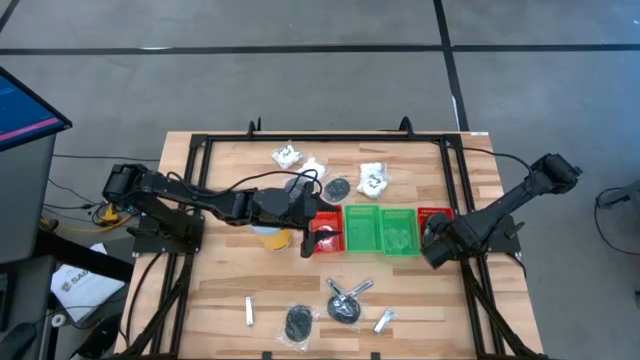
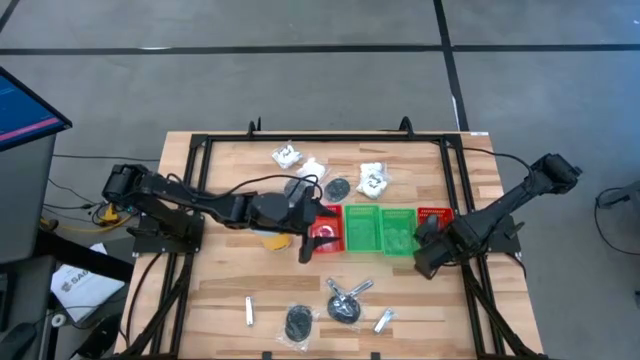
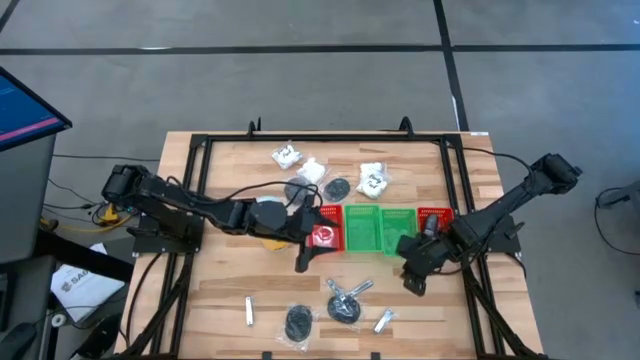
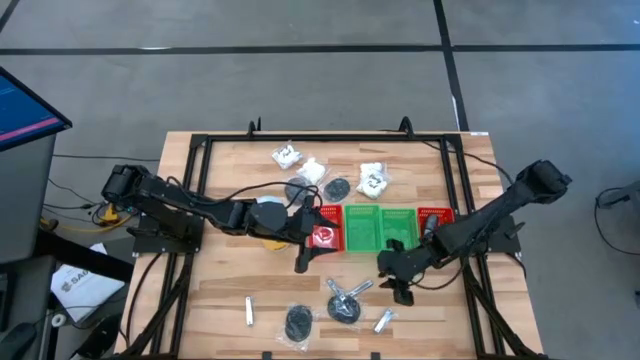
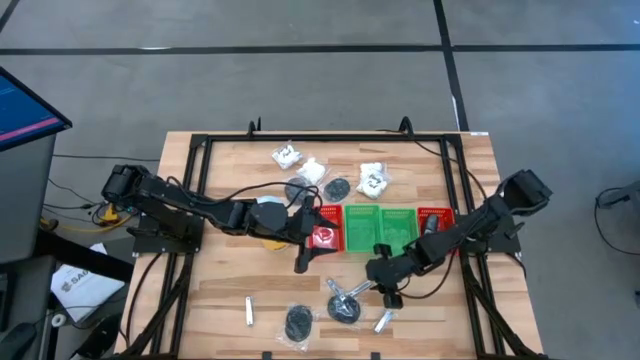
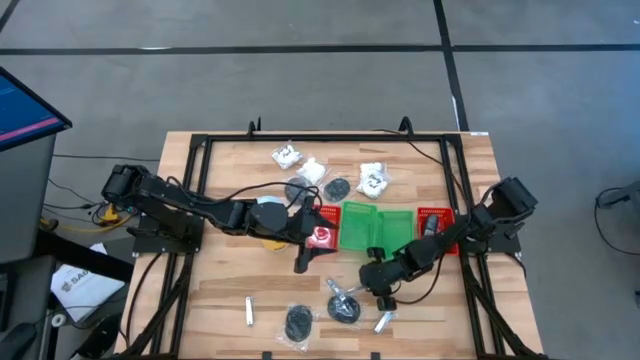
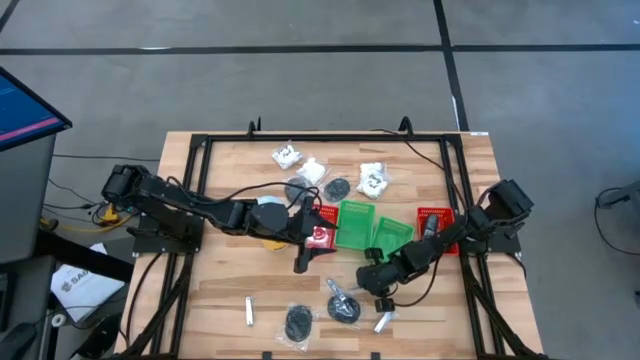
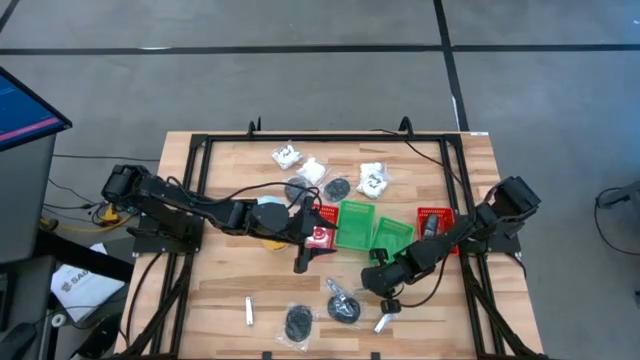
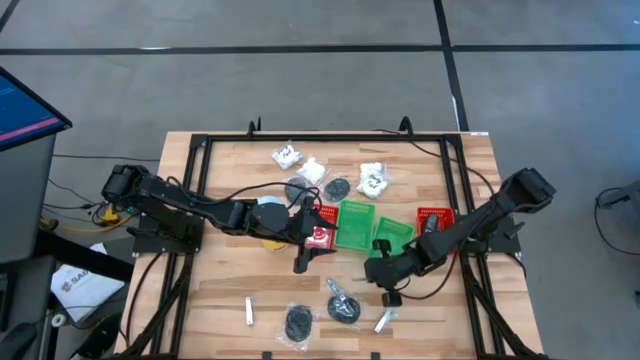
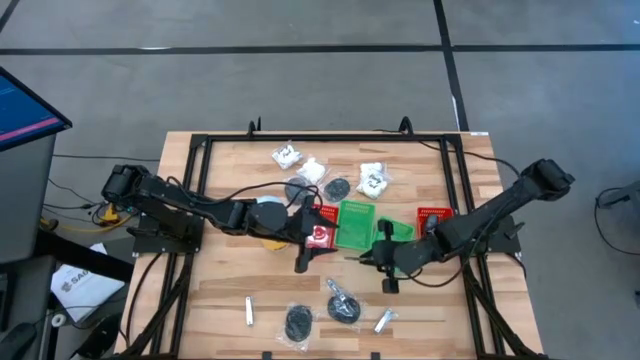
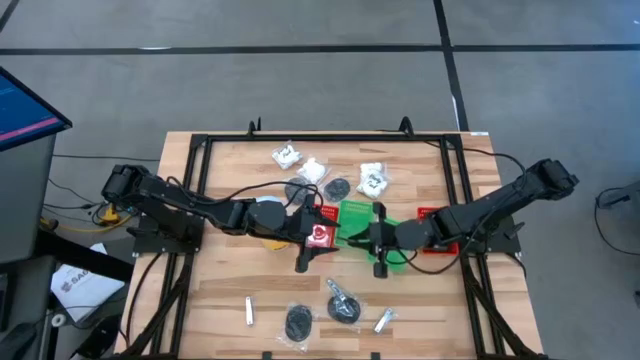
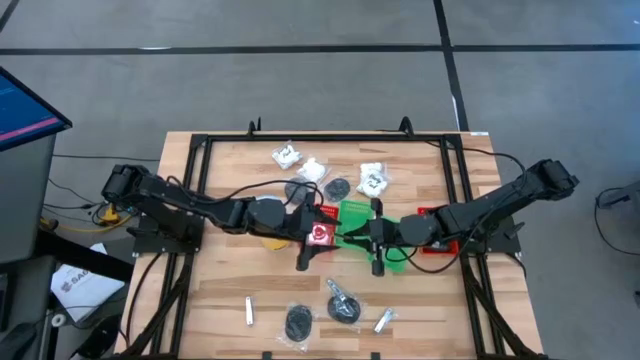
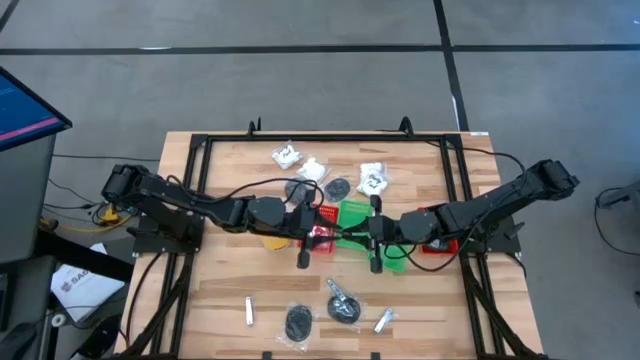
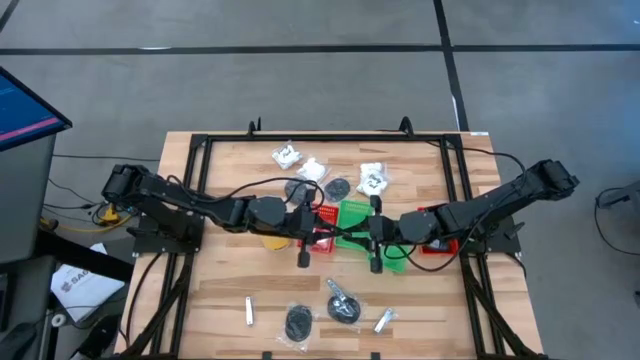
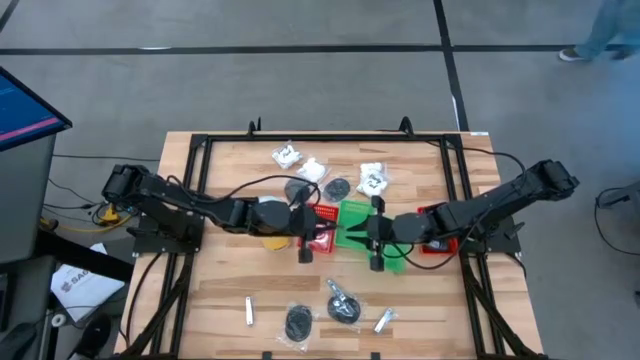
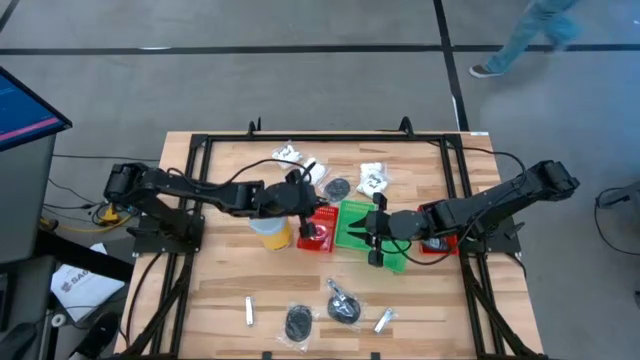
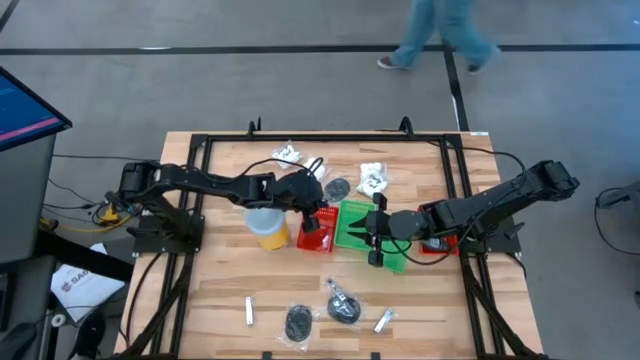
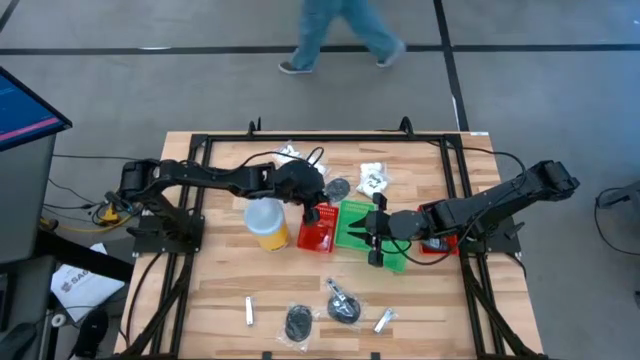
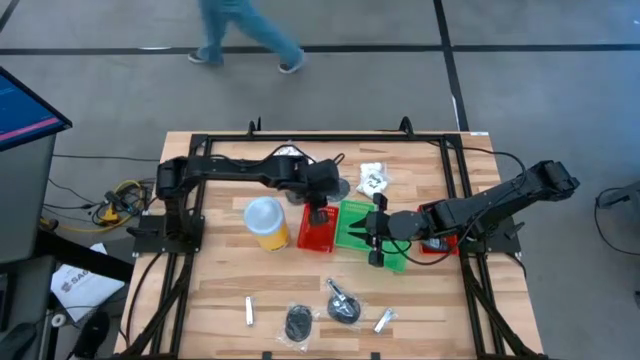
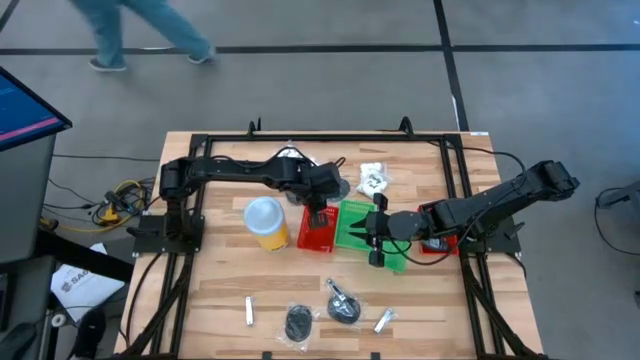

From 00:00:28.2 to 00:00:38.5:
Task: Pick & Place Travel size toiletries
Put the nail cutter into the left red bin

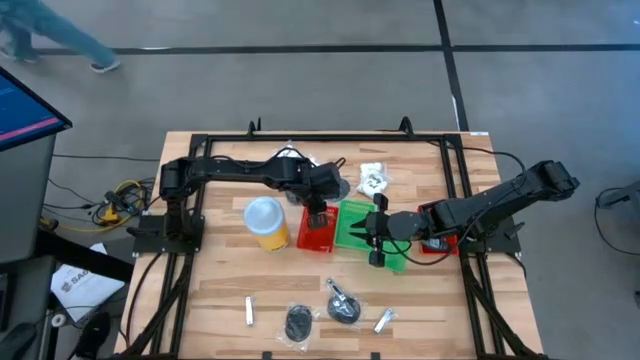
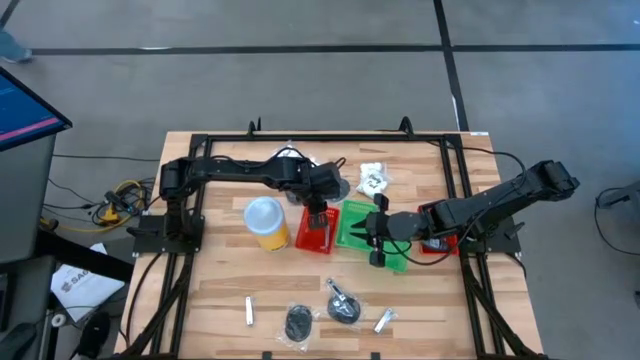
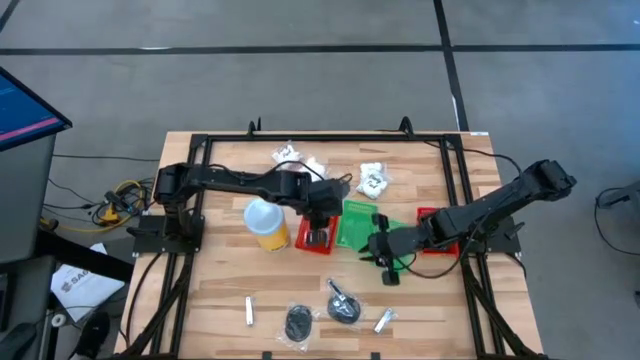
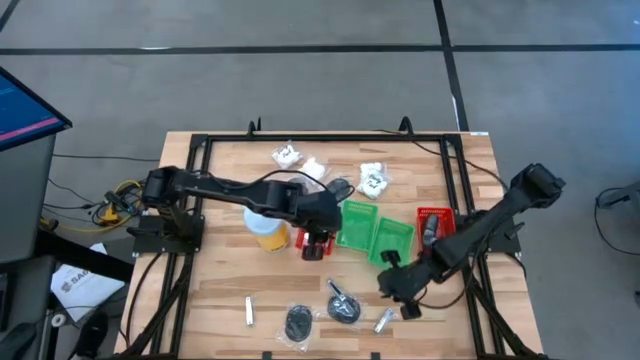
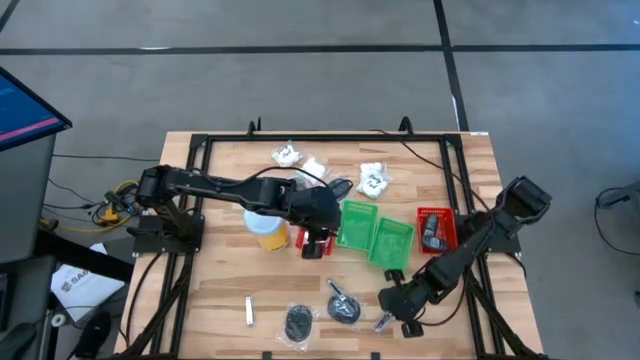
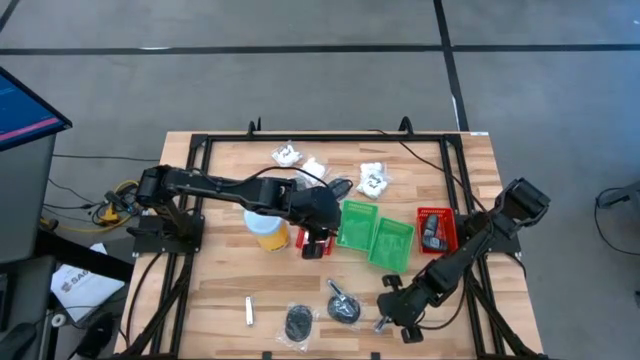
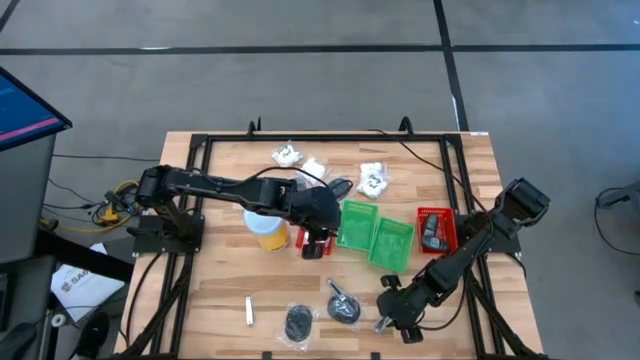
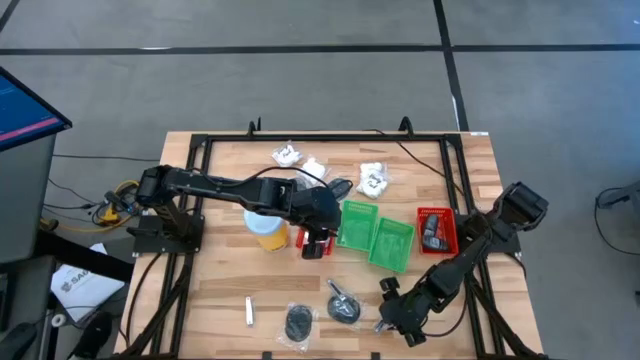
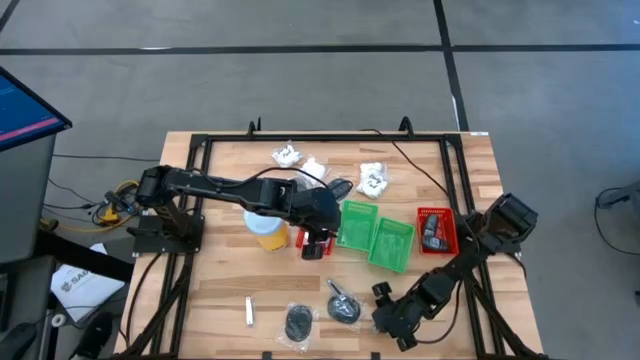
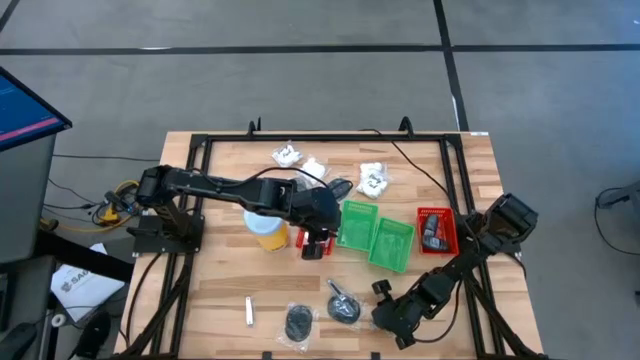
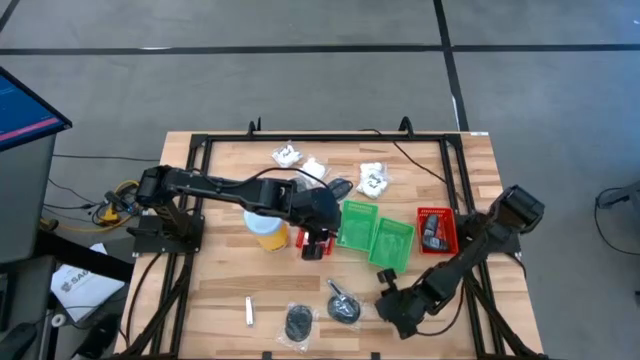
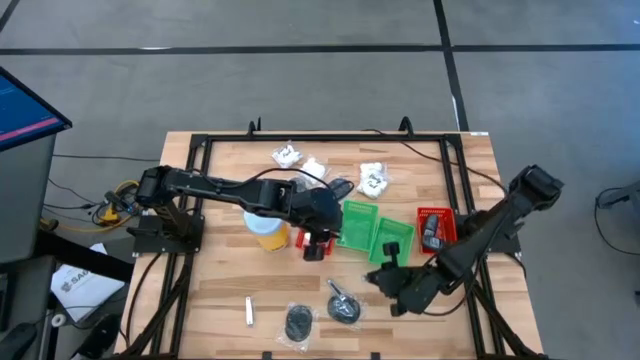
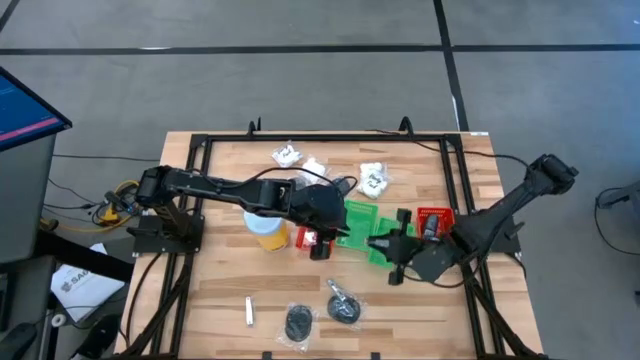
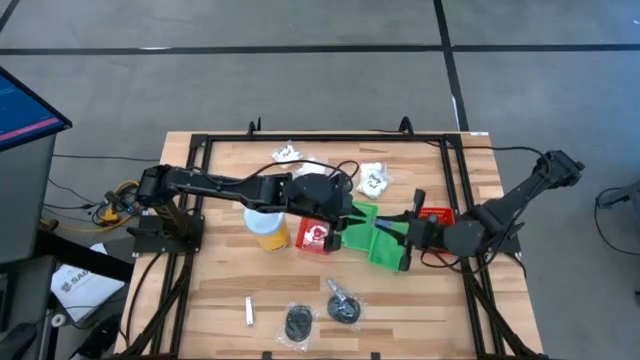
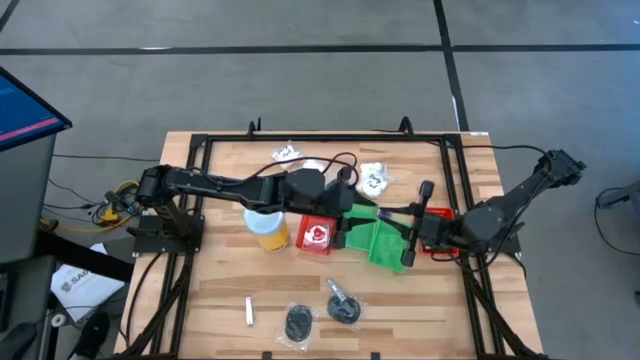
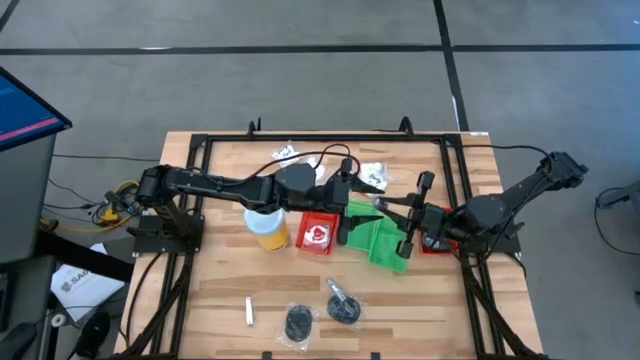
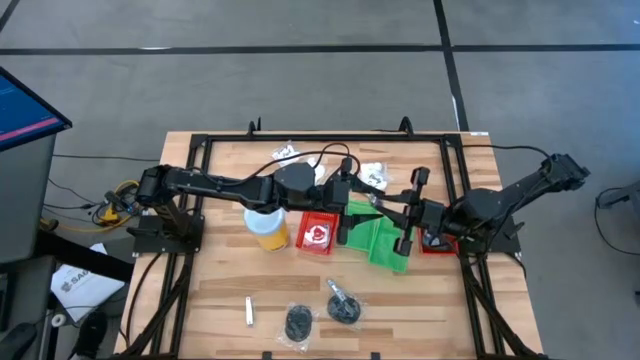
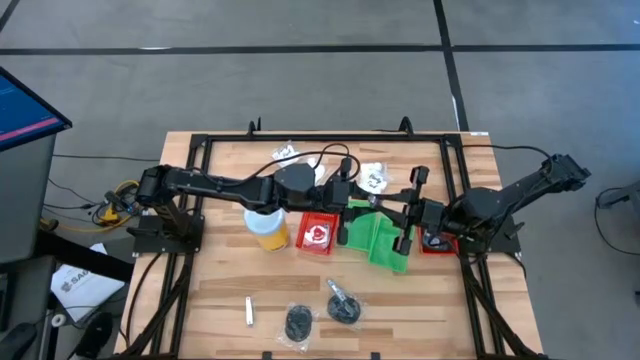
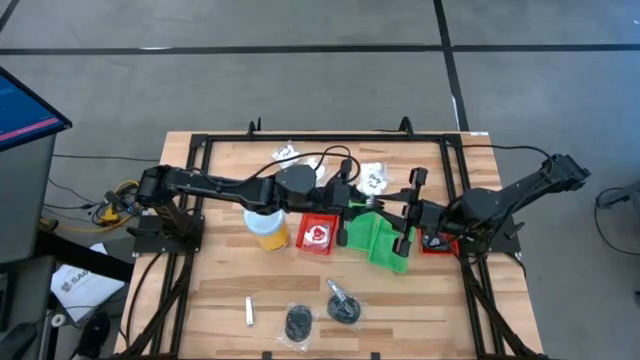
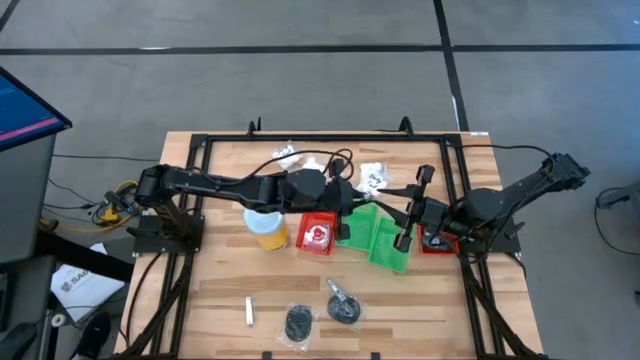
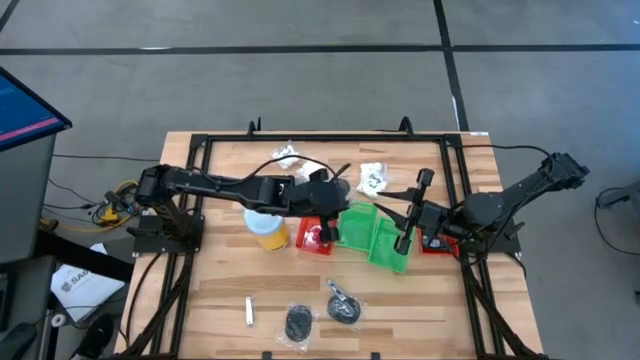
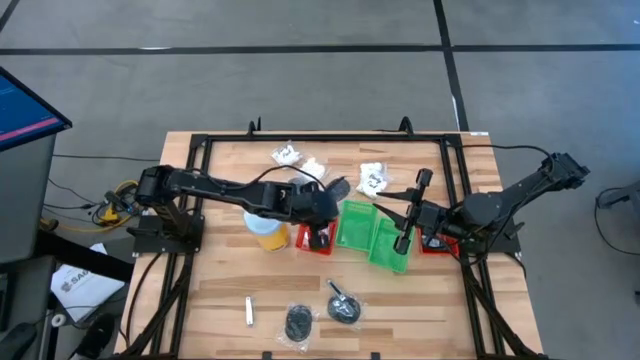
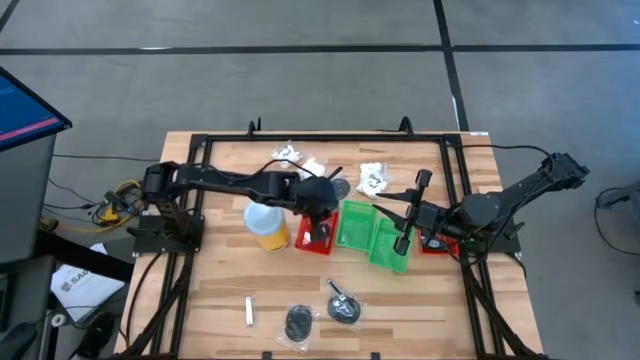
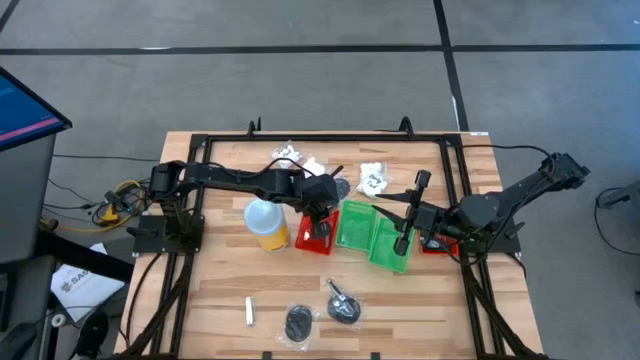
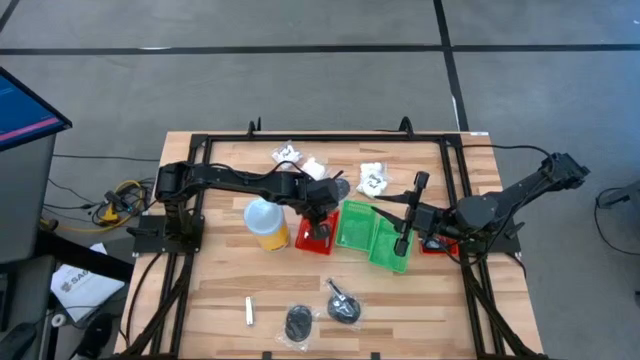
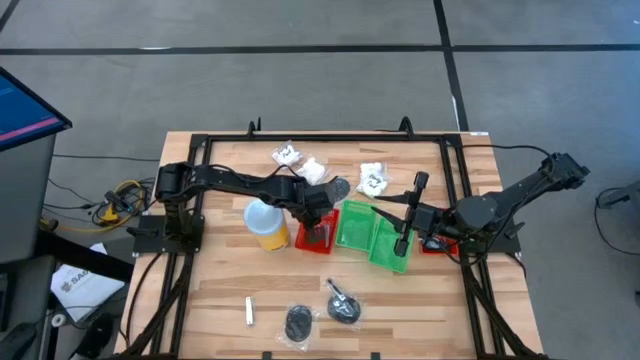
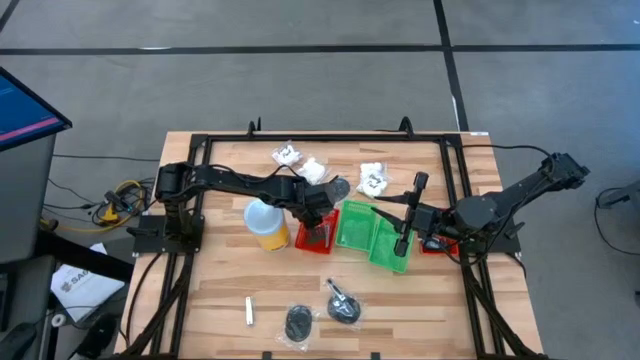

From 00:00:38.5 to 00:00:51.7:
Put the nail cutter into the left red bin
